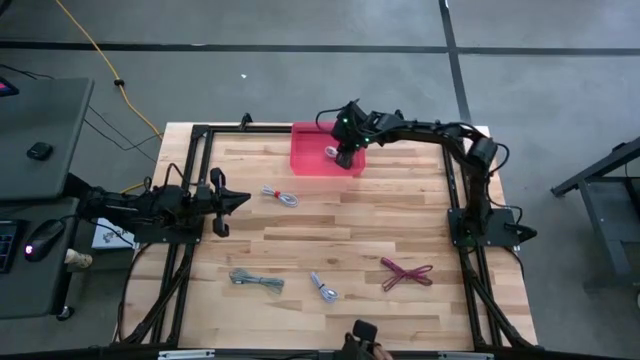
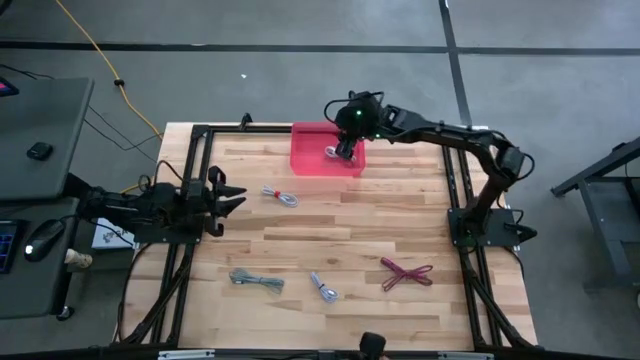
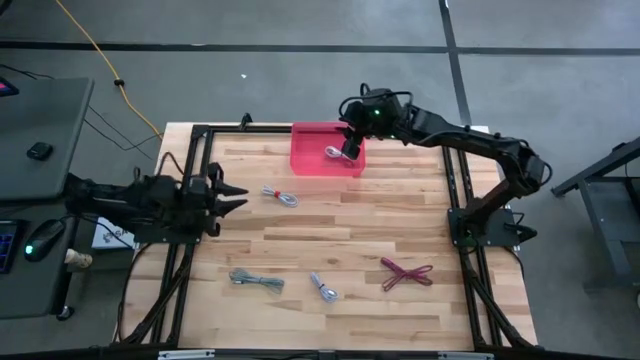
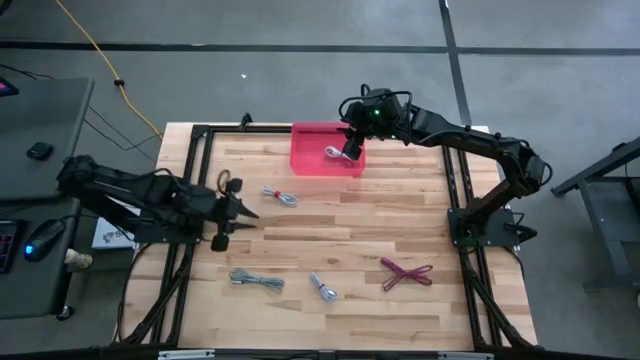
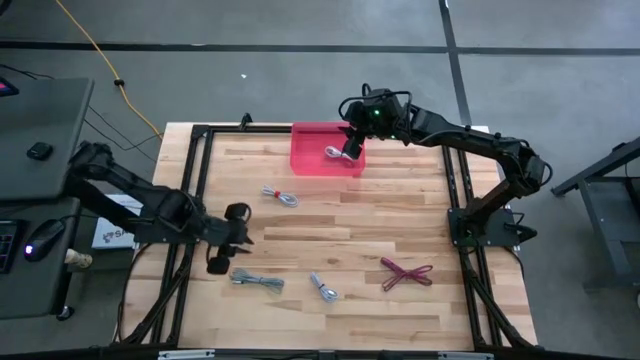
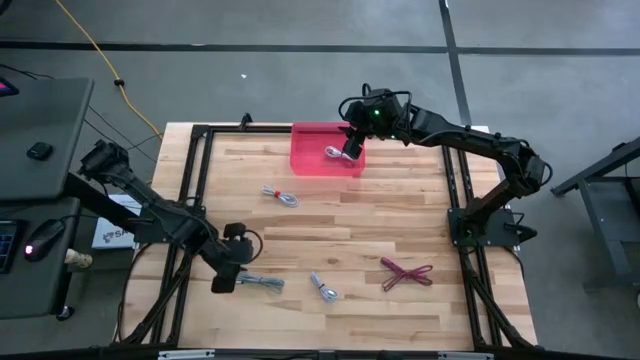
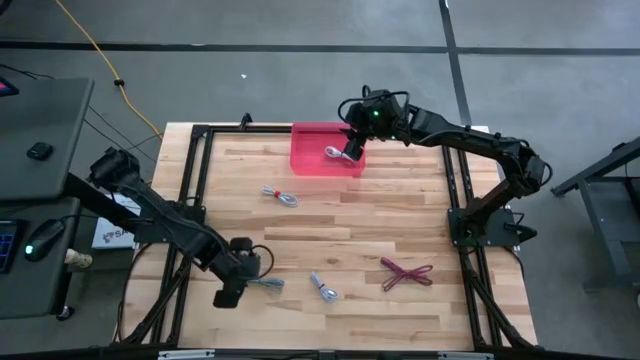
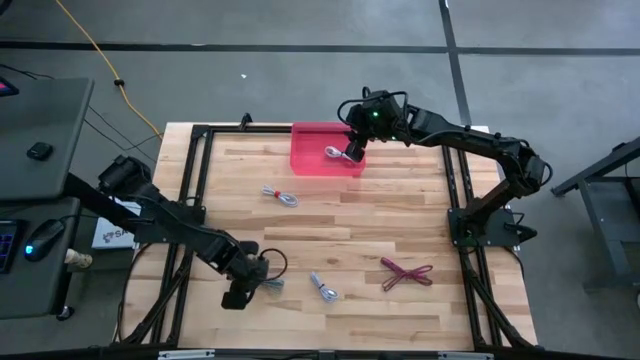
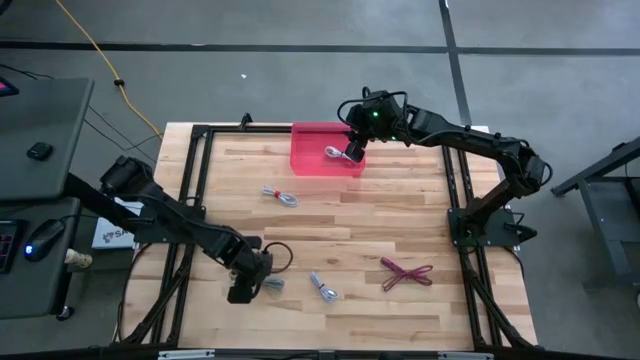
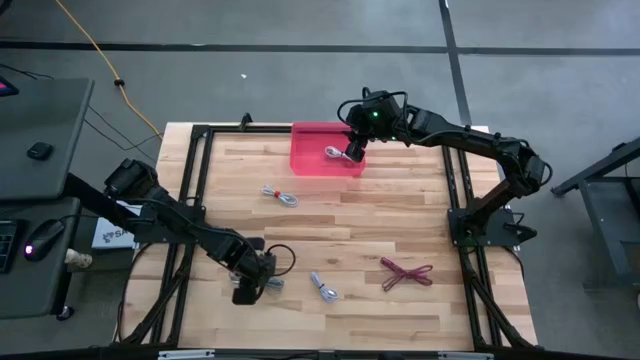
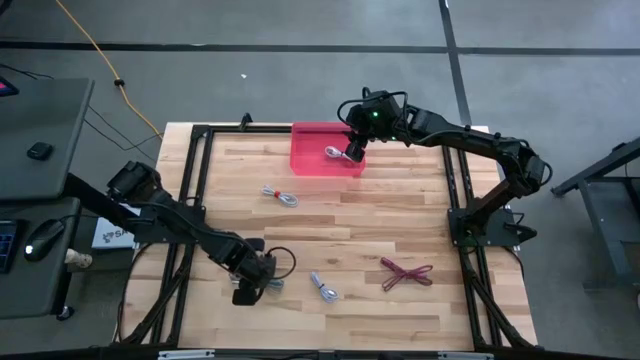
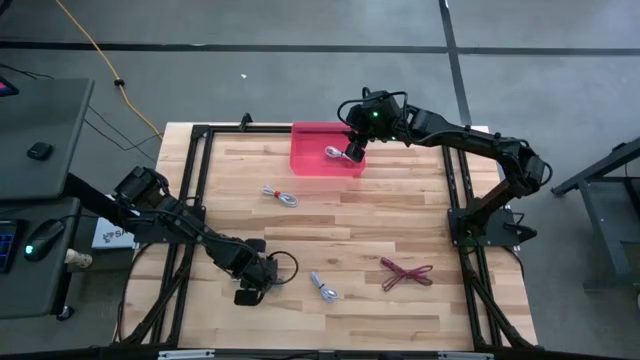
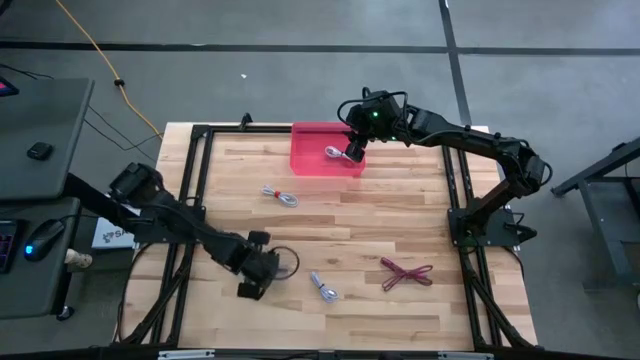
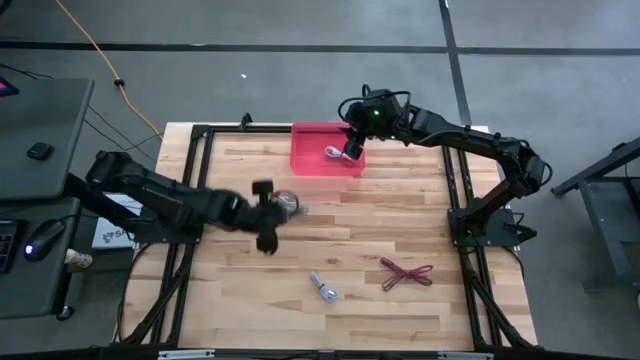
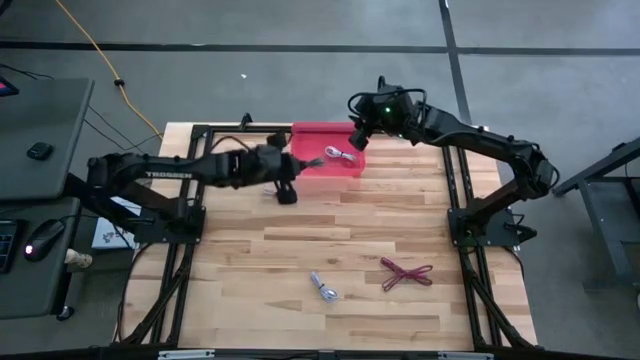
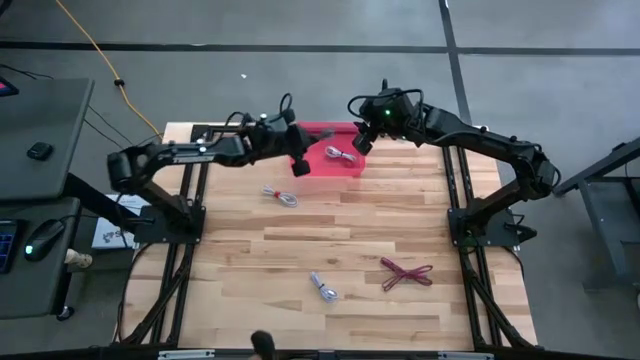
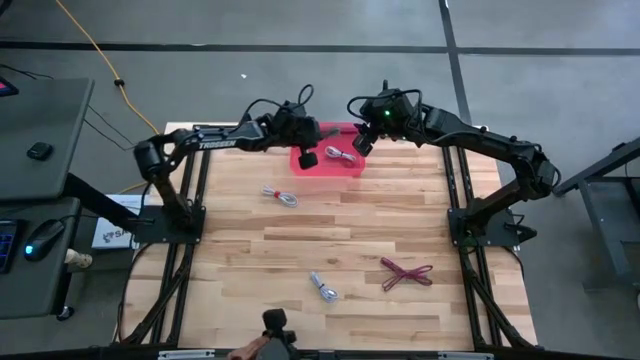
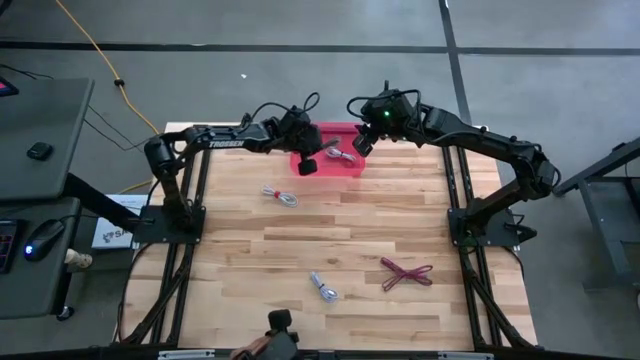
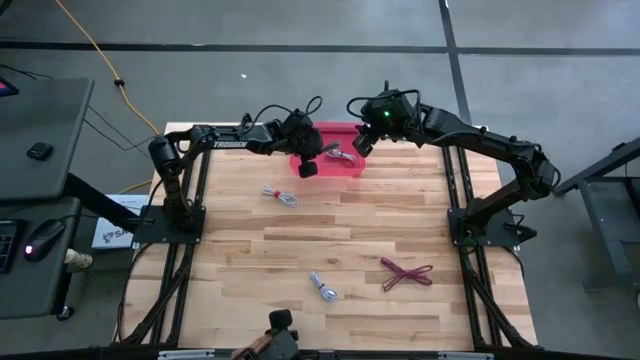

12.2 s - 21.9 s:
Put the gray charger cable into the pink bin

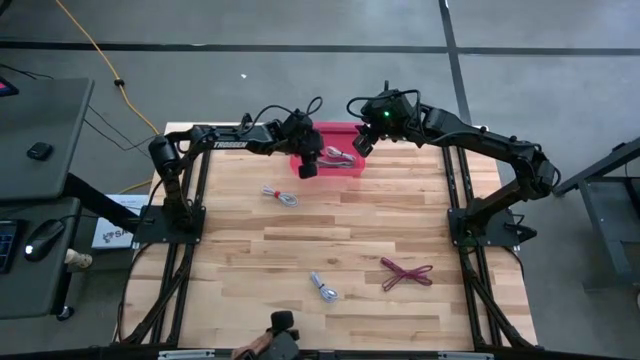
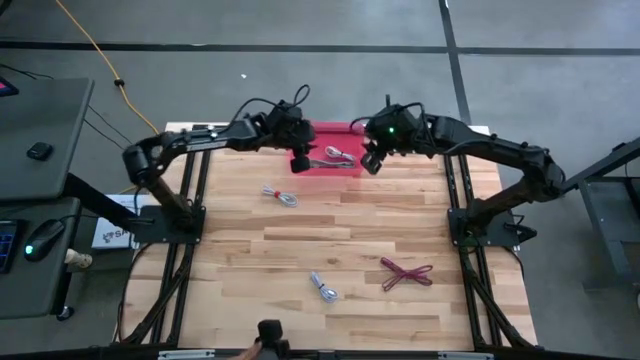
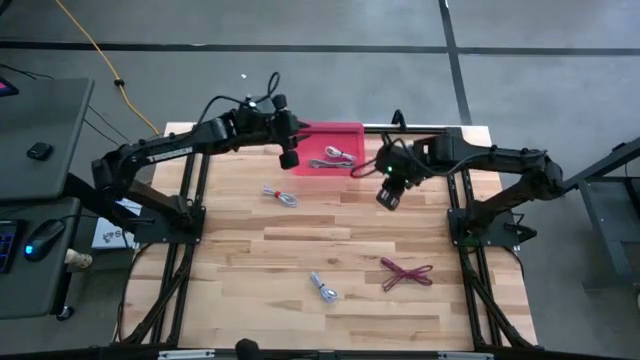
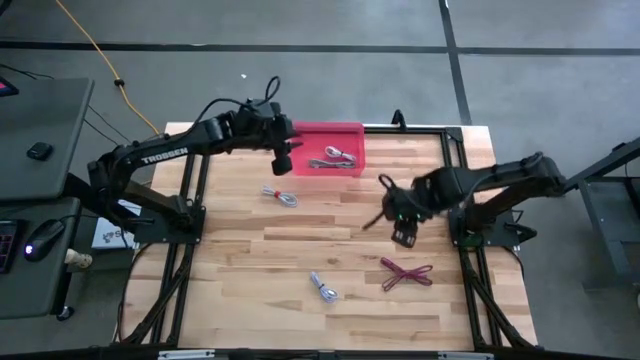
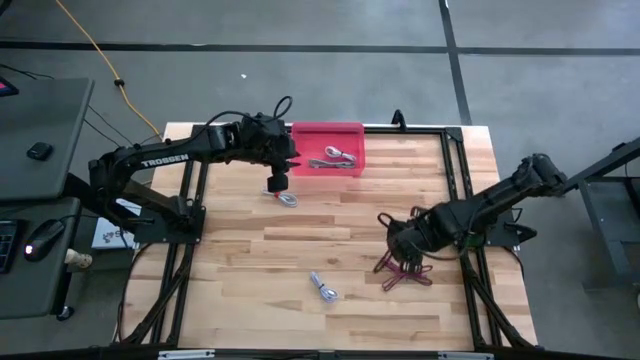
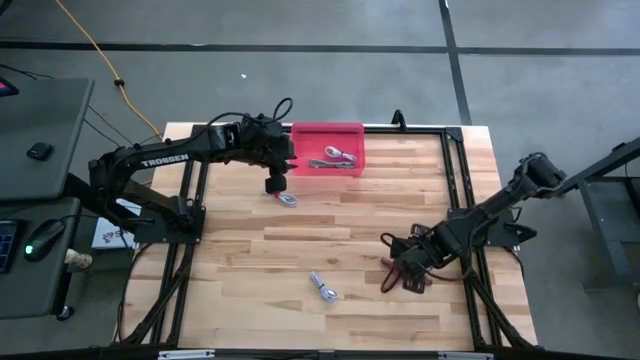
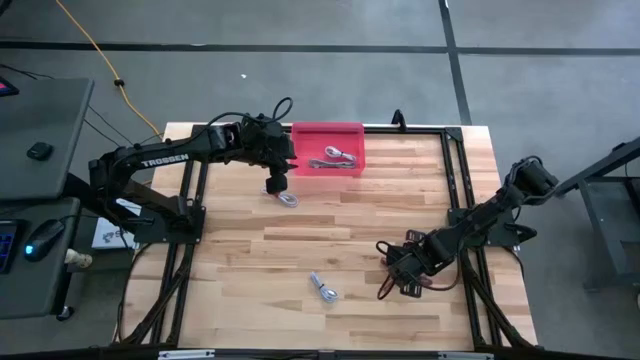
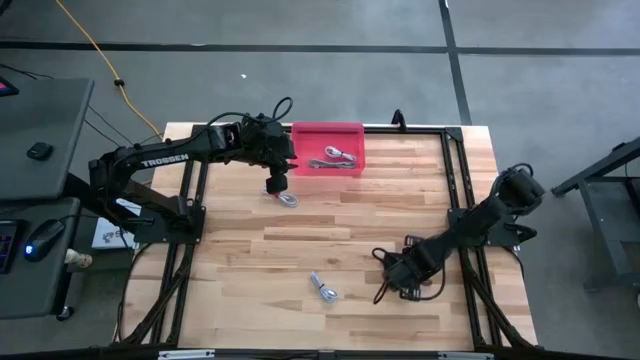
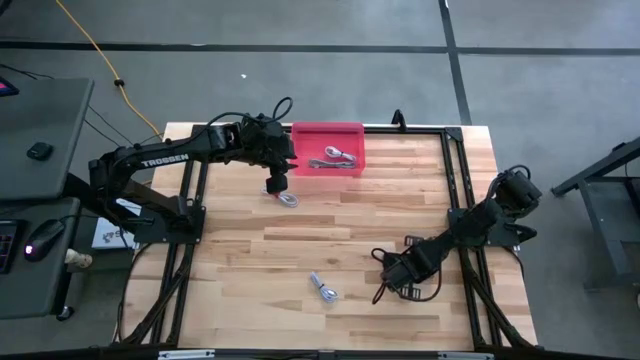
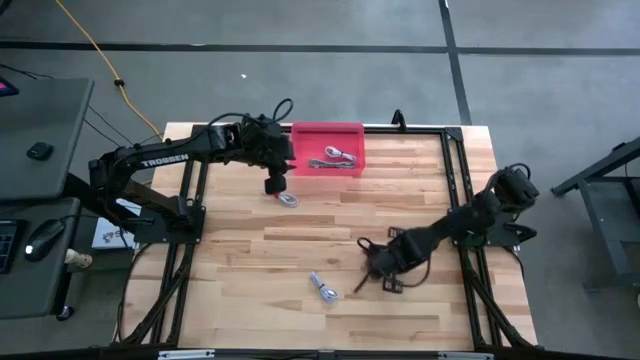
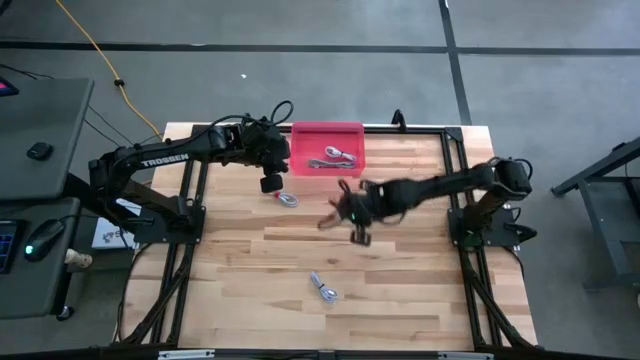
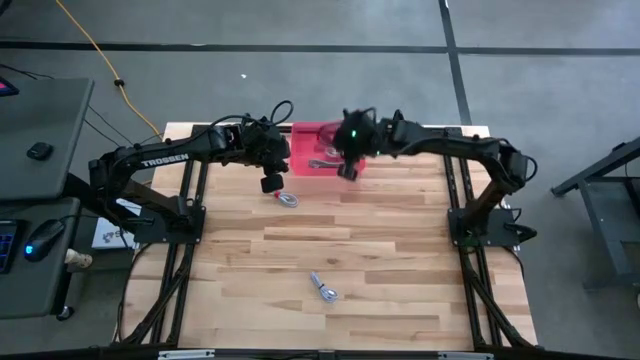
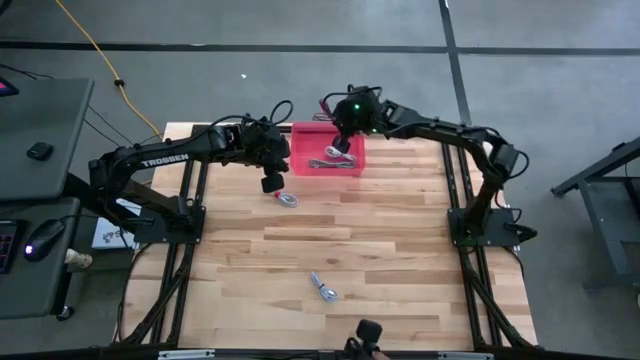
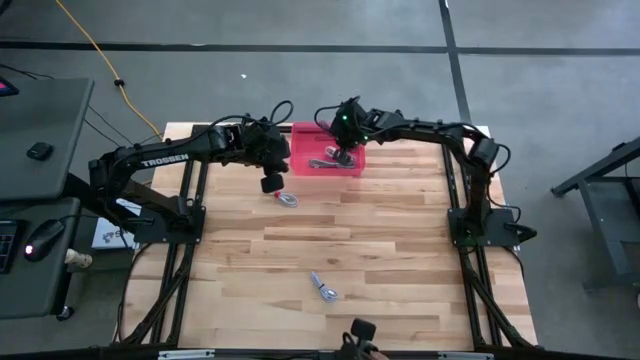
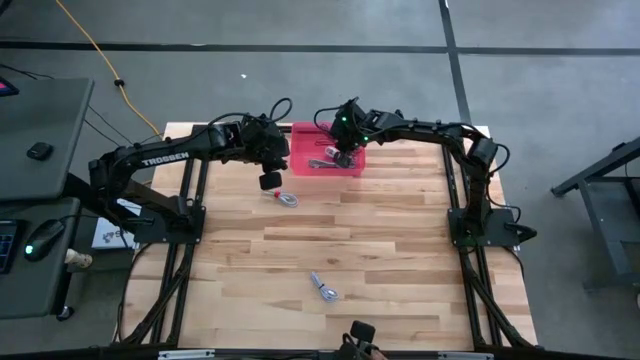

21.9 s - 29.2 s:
Put the pink charger cable into the pink bin

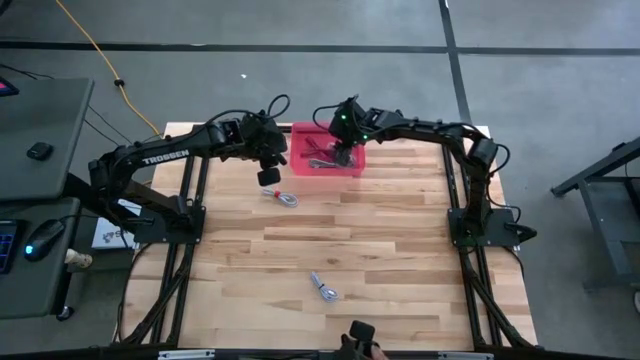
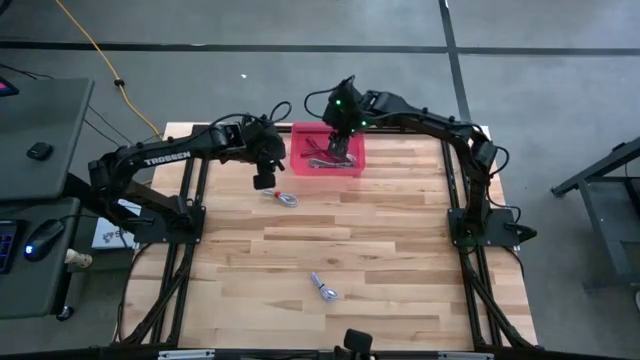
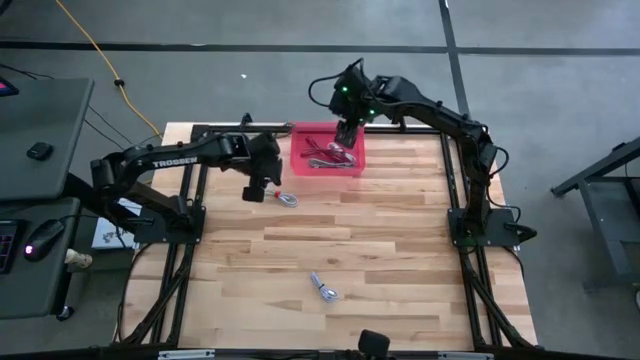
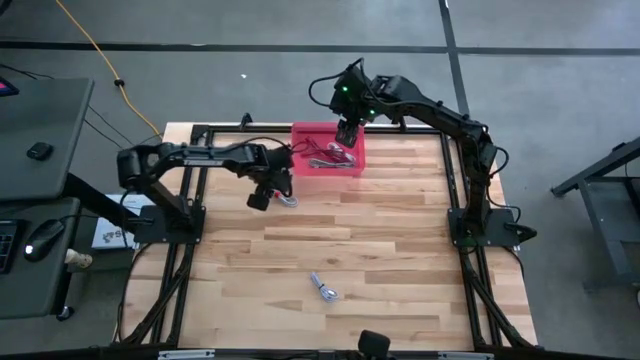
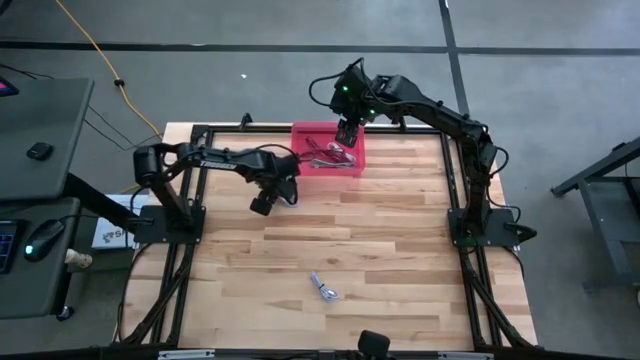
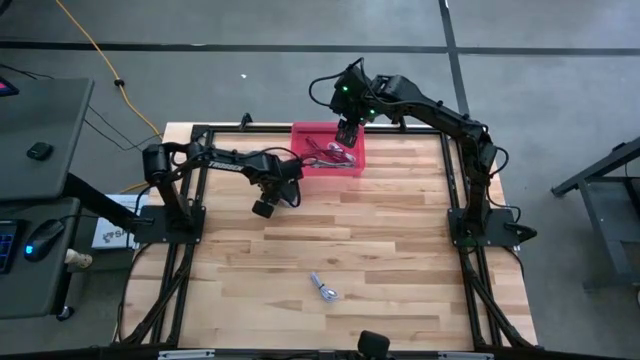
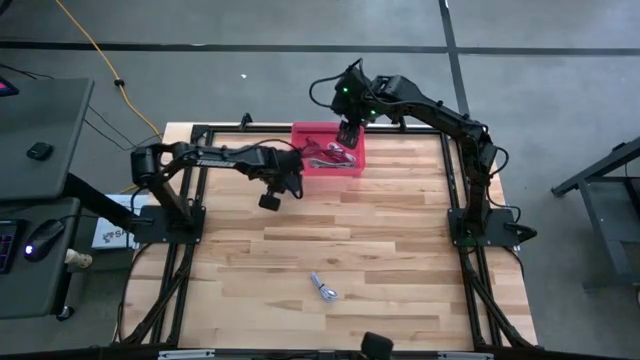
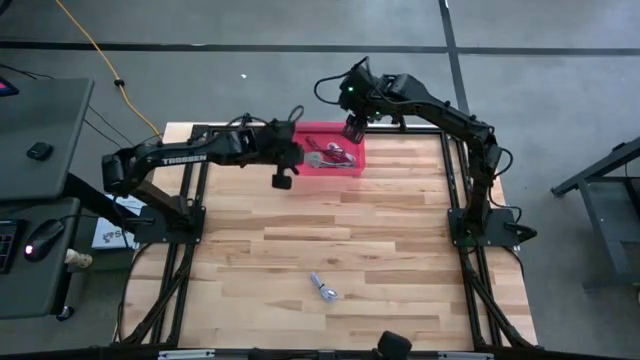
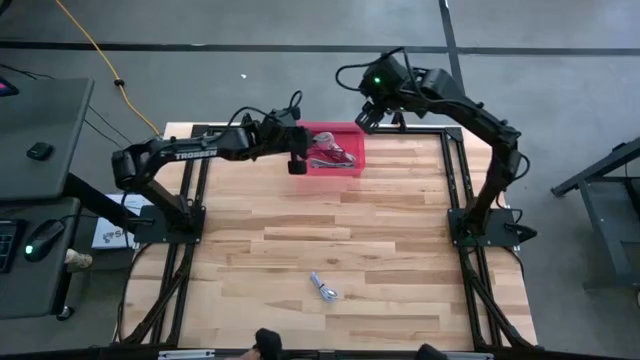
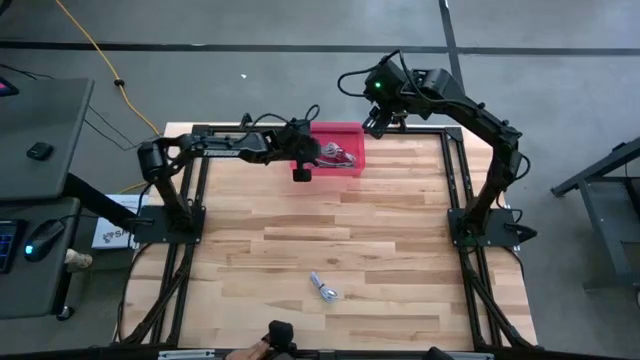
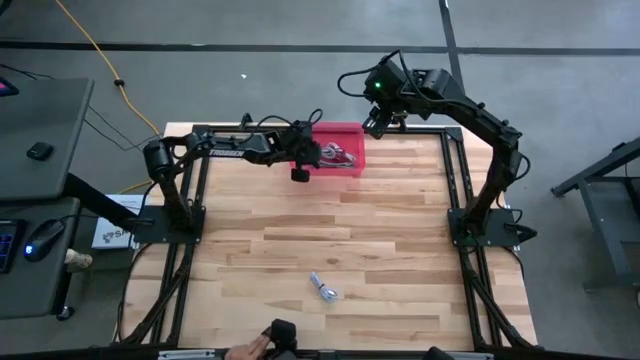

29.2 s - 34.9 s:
Put the white charger cable into the pink bin
